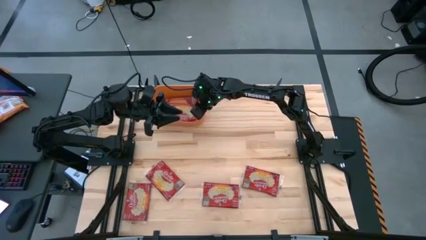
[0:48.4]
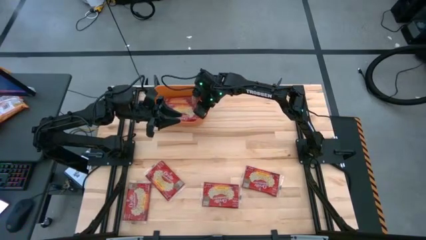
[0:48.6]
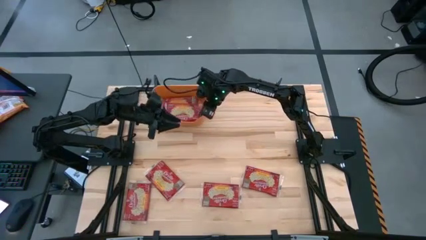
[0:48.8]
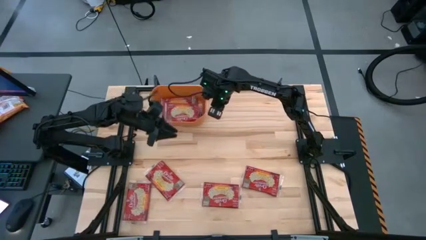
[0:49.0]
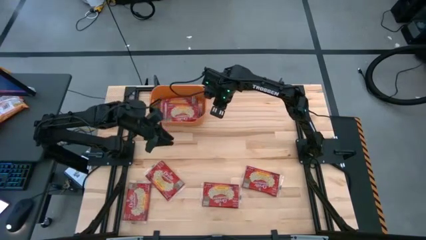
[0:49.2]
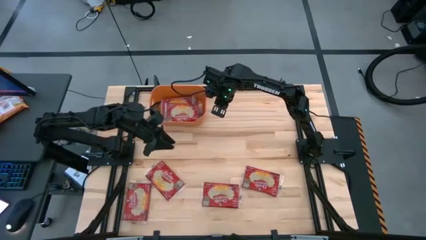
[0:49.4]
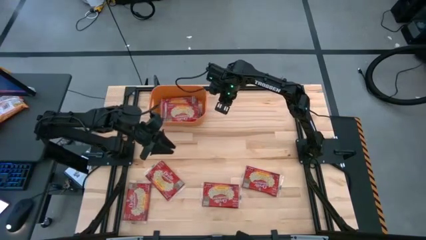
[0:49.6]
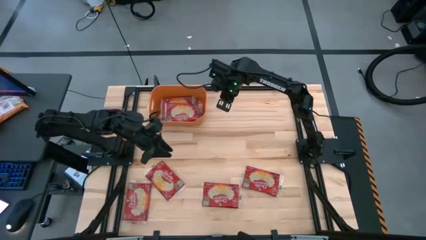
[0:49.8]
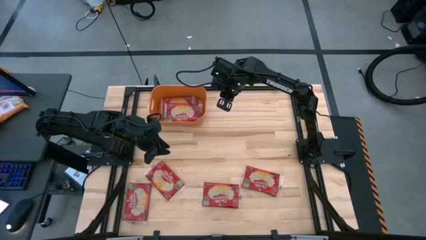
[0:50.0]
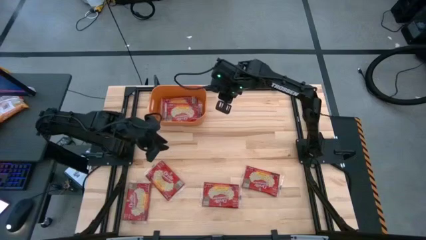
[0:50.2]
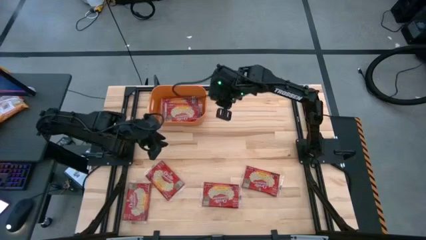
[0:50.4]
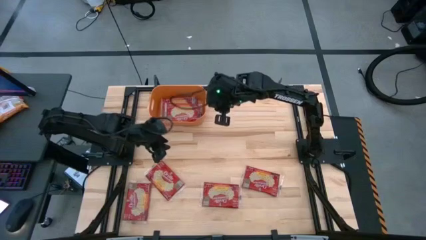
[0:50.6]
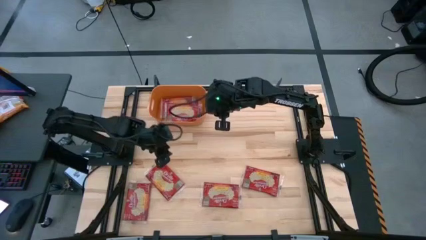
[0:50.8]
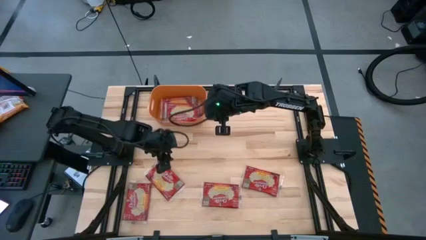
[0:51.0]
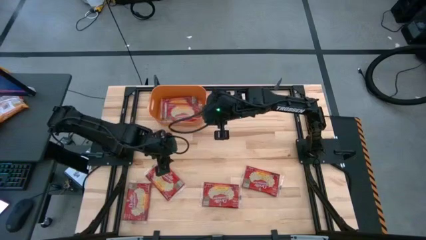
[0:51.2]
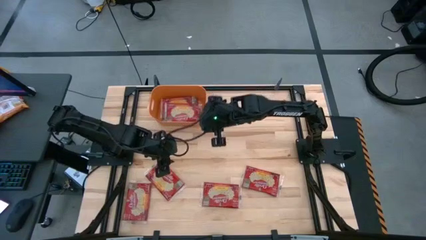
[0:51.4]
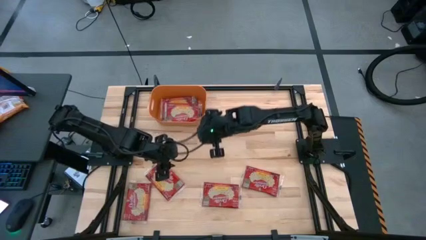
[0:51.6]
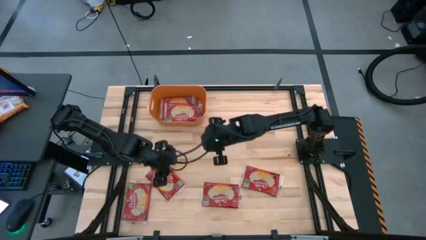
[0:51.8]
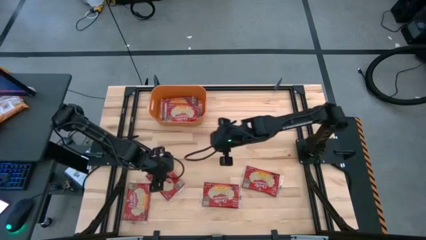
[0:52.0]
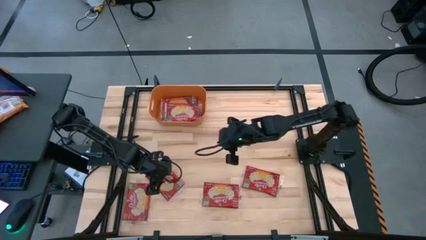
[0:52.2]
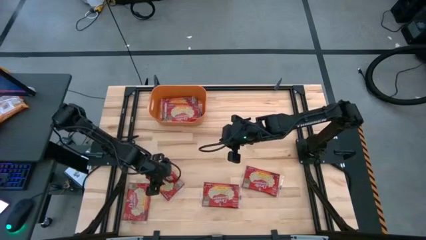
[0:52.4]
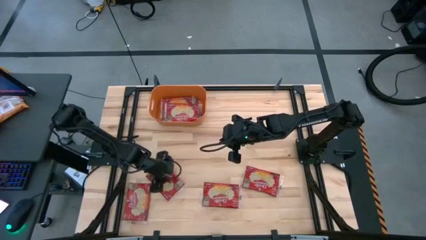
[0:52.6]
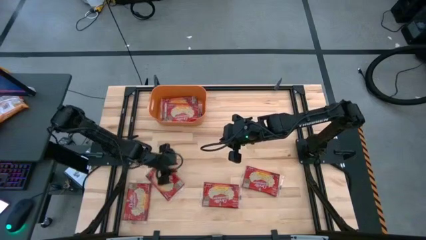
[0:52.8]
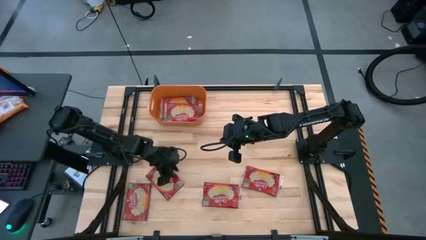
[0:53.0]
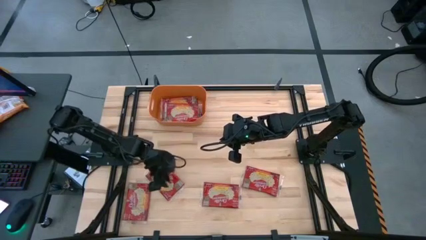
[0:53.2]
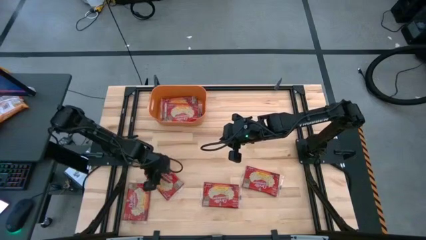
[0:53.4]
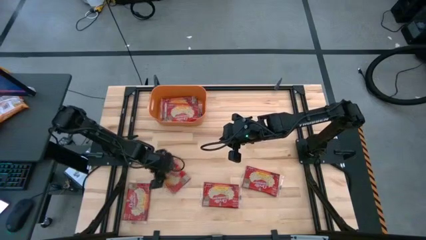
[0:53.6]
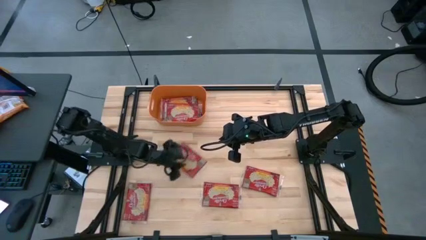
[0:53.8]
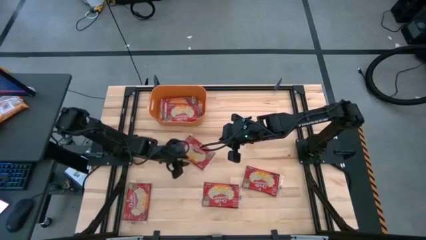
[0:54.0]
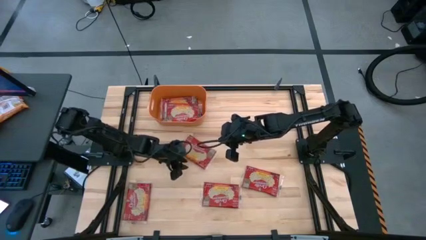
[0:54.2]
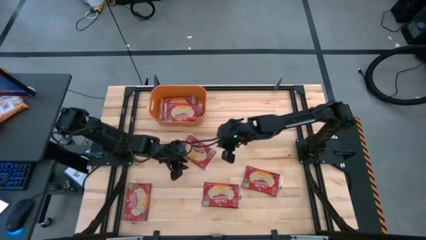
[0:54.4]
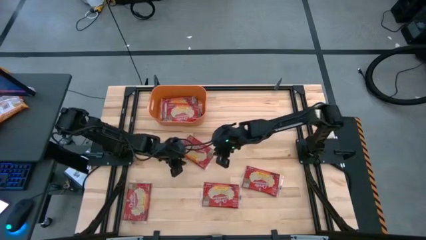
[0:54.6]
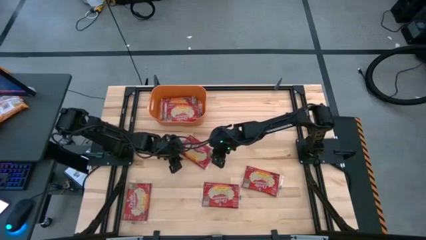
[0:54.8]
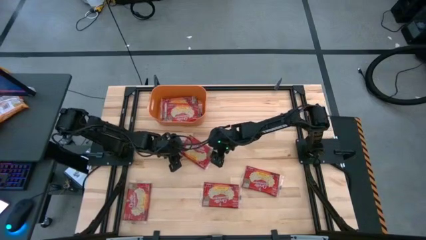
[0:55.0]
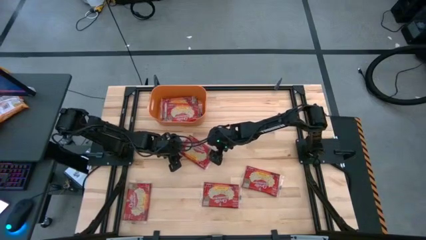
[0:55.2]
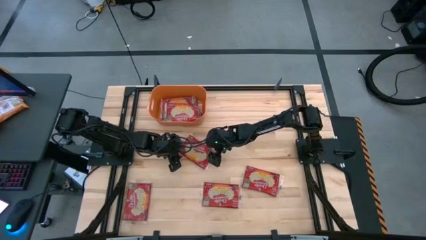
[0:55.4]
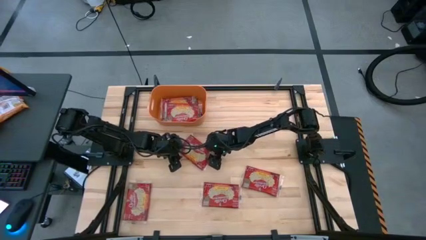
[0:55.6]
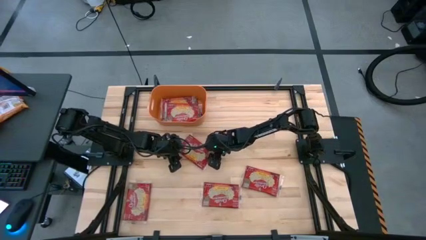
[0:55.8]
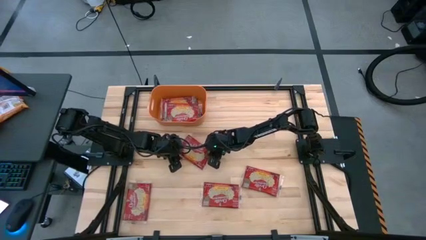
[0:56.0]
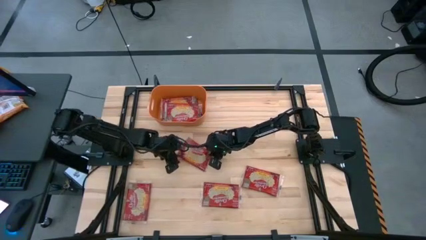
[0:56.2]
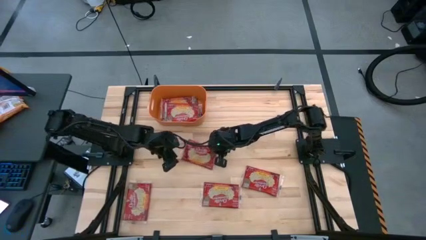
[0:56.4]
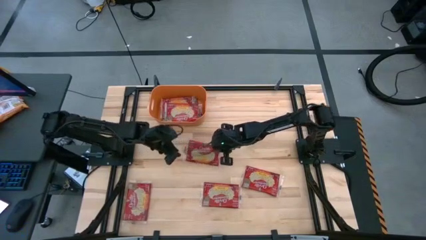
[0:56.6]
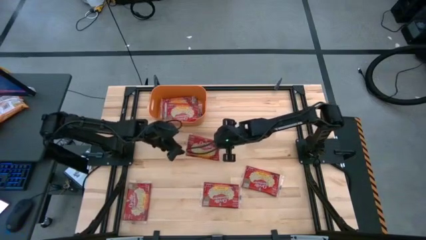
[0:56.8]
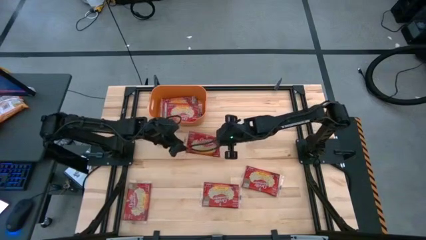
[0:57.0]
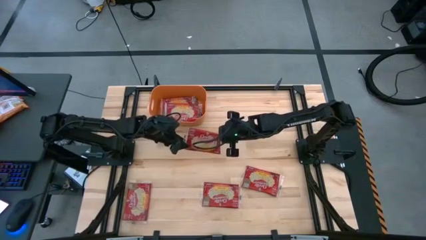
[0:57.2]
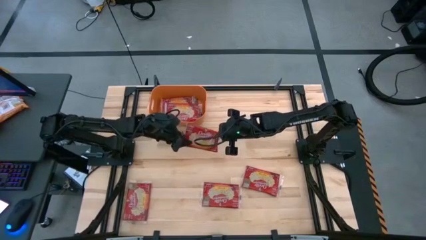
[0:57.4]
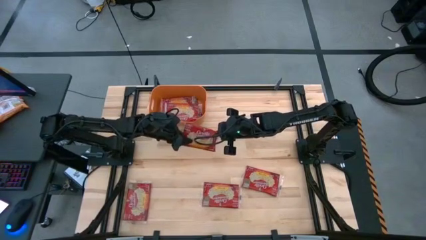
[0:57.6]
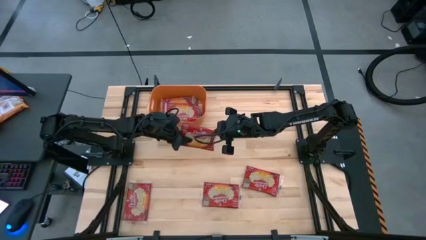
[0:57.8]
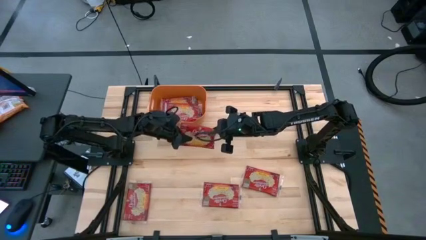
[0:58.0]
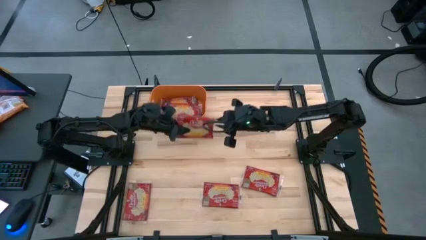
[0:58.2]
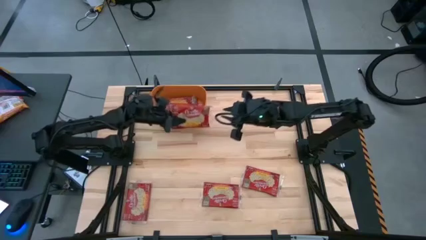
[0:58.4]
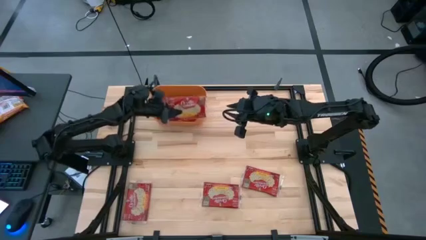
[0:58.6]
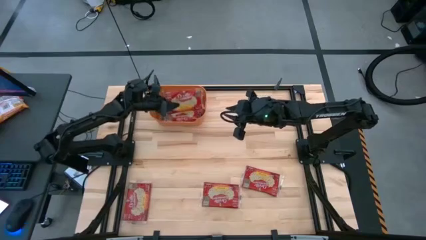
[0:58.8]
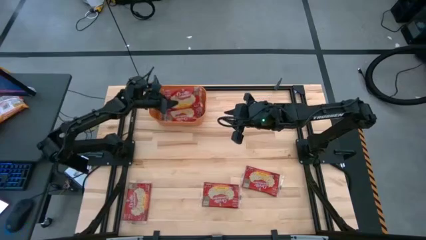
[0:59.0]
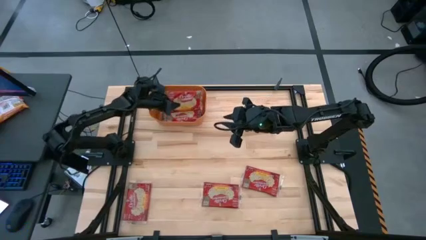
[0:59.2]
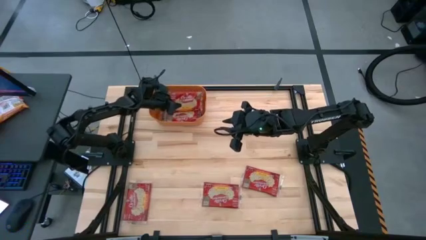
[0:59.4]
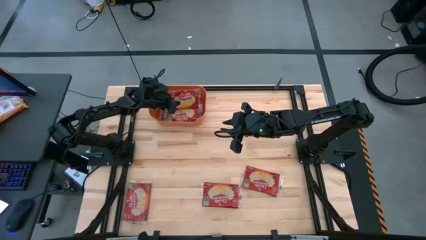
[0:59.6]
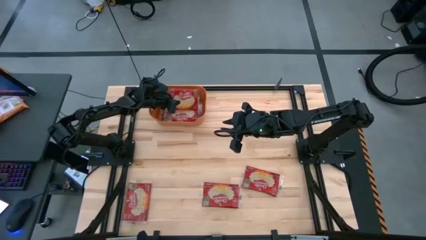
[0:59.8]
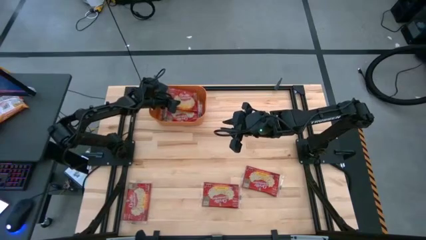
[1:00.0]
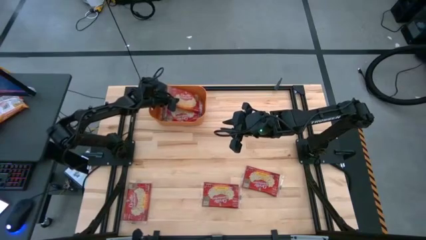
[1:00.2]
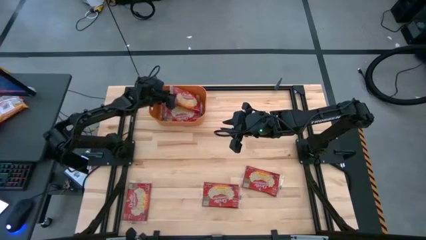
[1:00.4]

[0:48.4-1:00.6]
Task: Sort popcorn bags into baskets
Put the red popcorn bag into the orange bin

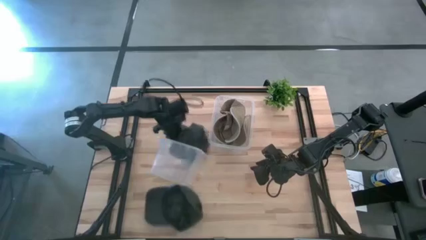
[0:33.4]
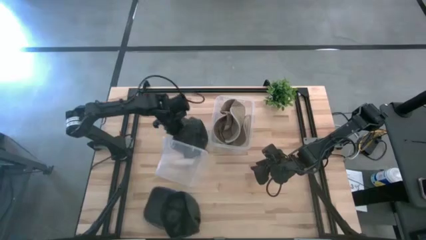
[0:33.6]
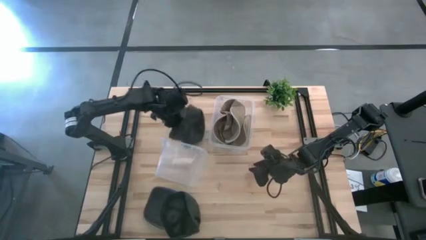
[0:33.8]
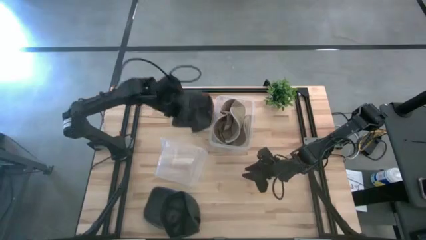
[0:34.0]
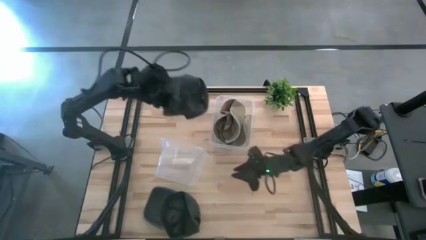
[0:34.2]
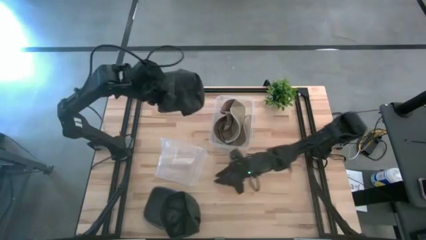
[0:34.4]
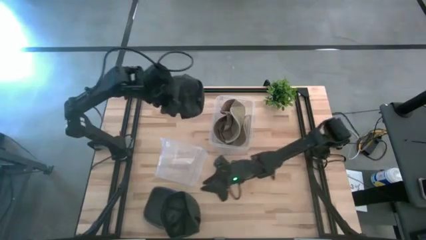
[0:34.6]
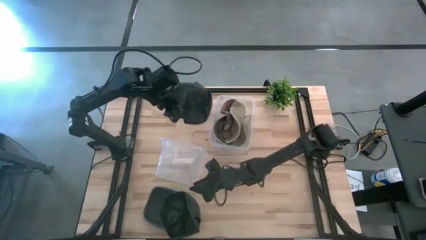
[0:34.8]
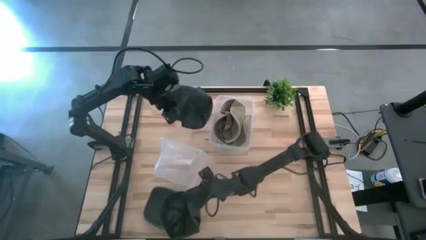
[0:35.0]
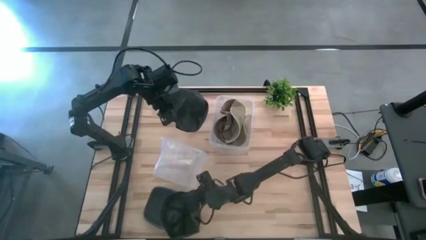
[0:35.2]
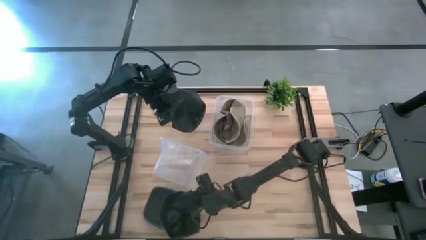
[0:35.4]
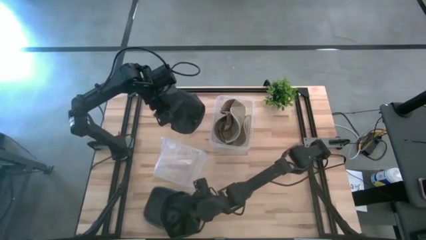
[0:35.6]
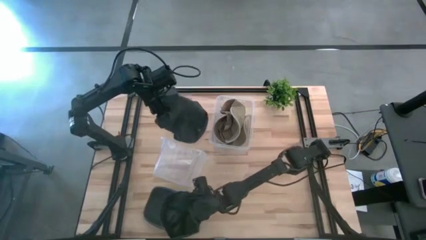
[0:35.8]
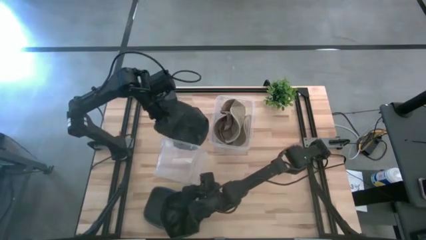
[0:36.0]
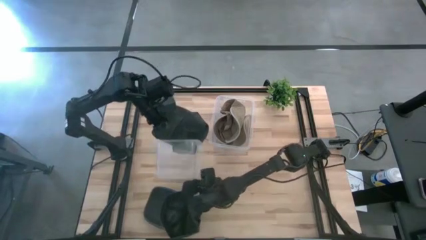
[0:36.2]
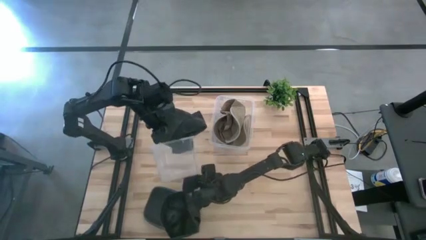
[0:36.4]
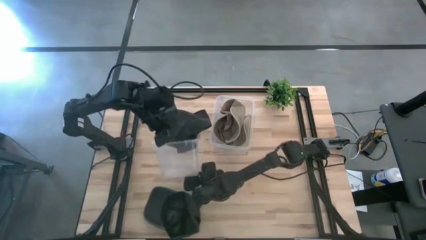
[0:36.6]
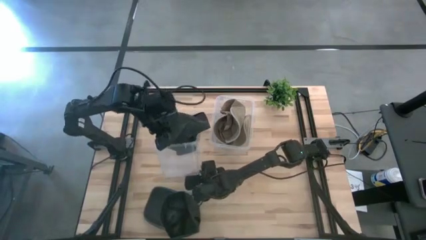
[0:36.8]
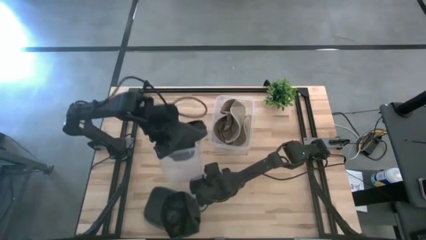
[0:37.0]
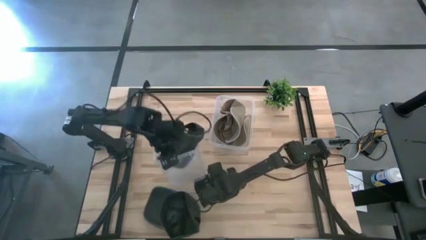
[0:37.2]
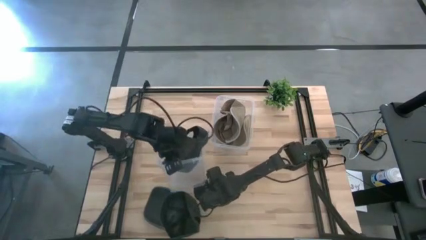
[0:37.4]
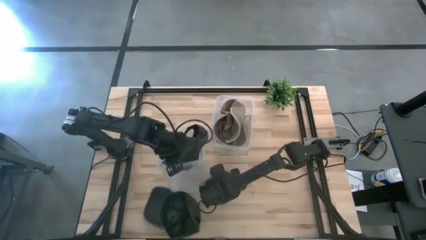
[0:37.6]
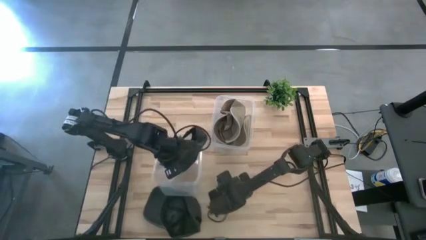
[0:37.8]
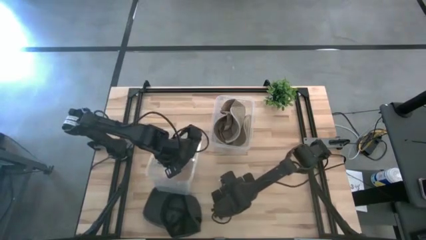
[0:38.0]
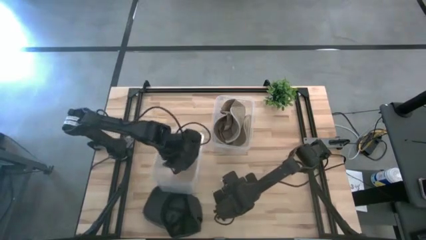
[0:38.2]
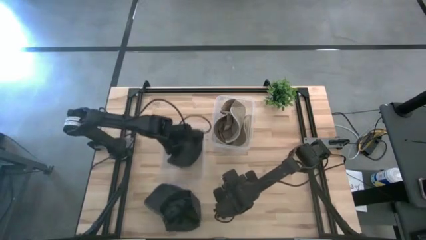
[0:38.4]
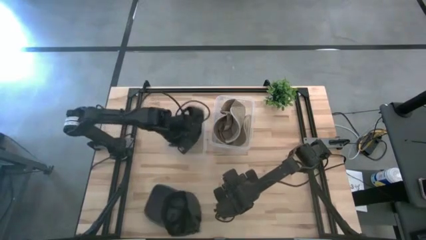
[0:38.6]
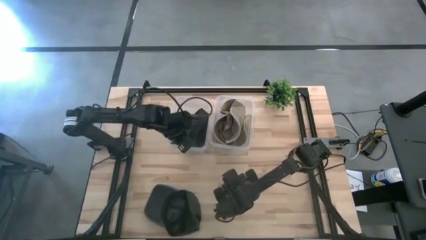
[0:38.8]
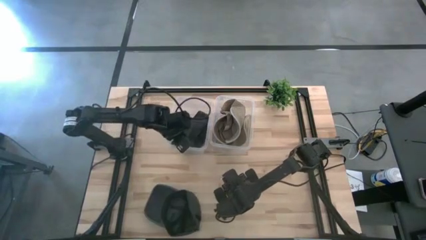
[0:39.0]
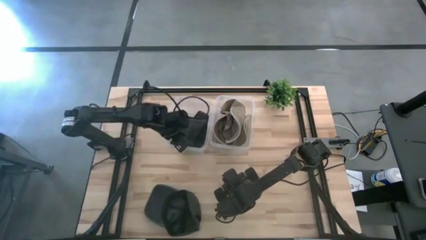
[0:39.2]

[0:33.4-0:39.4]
Task: Pick & Place hat
Put the right black cap into the left transparent bin
